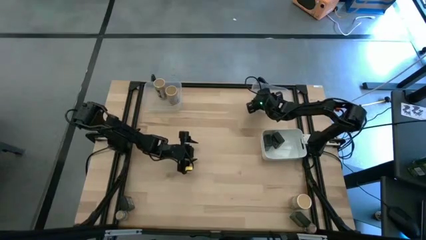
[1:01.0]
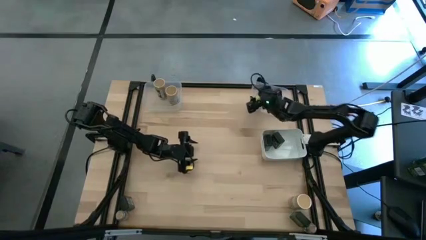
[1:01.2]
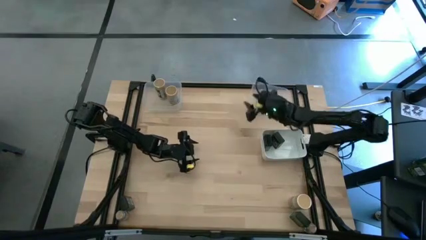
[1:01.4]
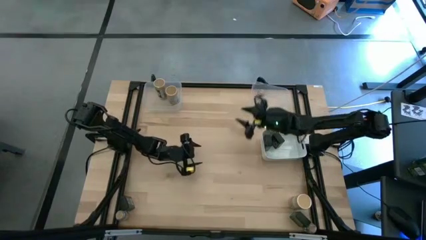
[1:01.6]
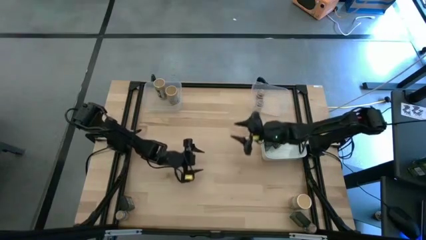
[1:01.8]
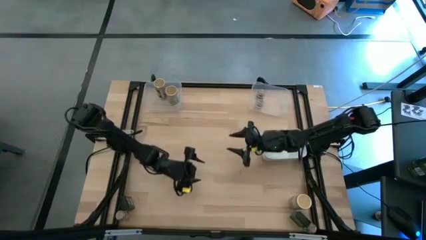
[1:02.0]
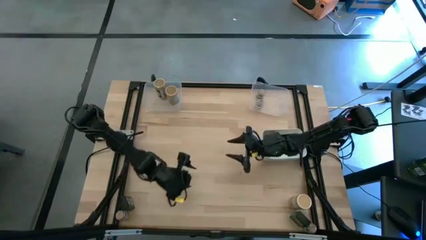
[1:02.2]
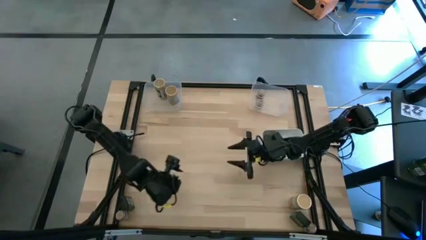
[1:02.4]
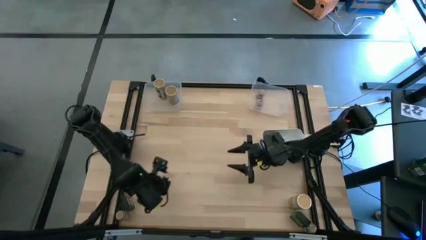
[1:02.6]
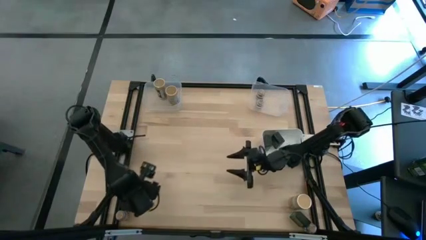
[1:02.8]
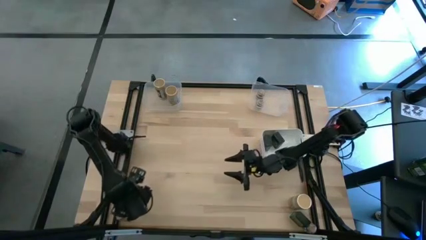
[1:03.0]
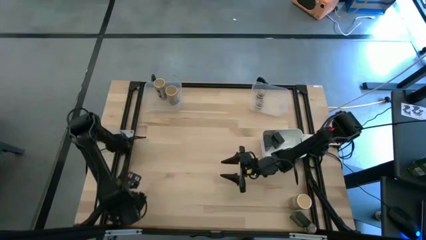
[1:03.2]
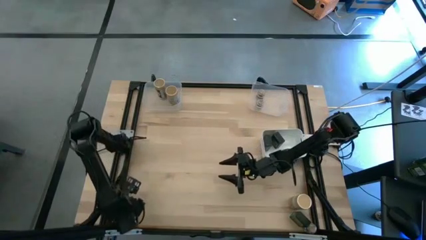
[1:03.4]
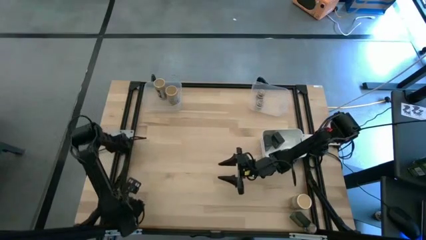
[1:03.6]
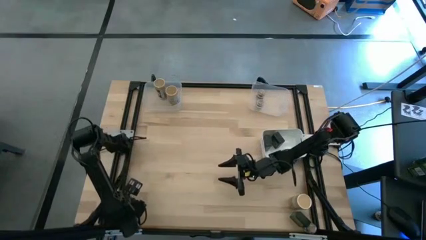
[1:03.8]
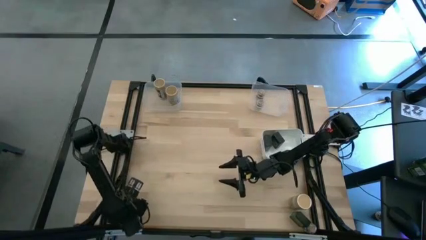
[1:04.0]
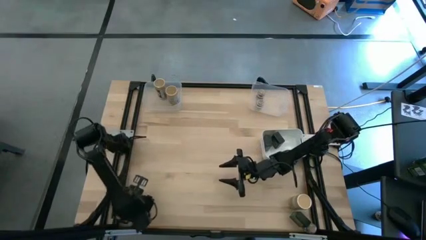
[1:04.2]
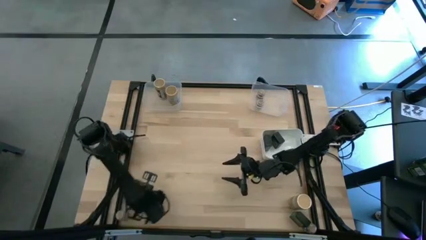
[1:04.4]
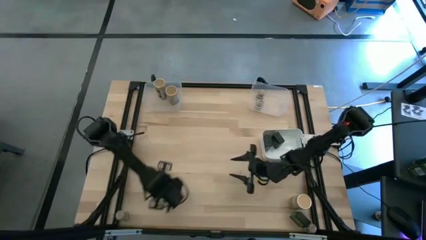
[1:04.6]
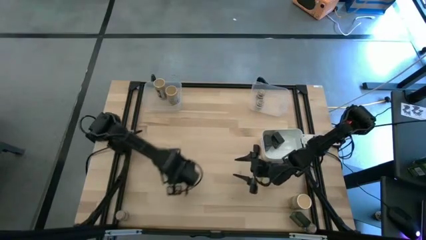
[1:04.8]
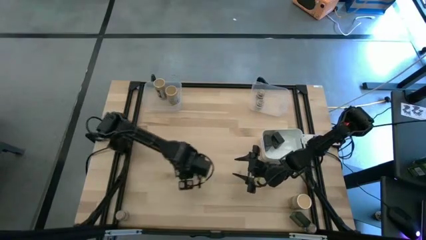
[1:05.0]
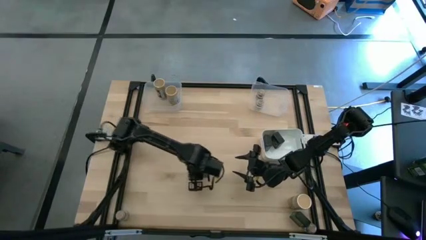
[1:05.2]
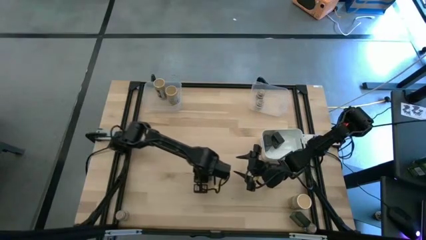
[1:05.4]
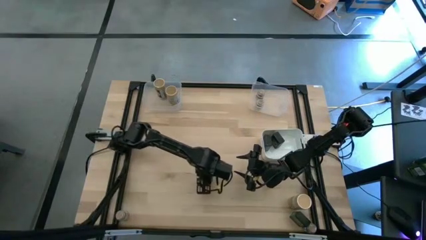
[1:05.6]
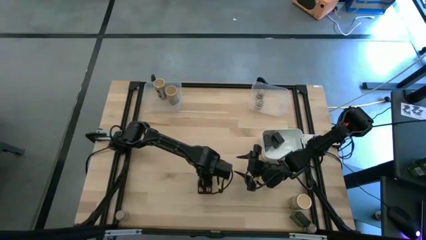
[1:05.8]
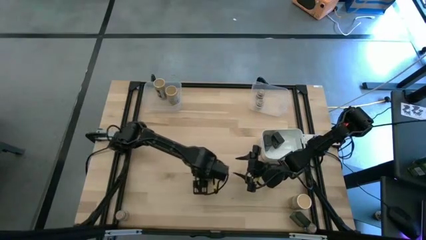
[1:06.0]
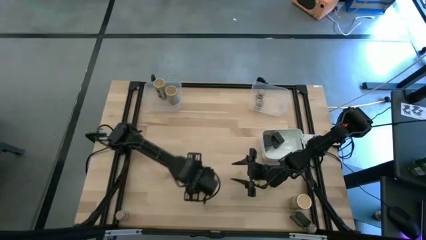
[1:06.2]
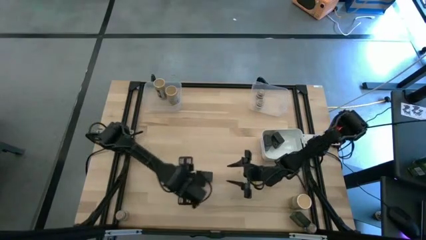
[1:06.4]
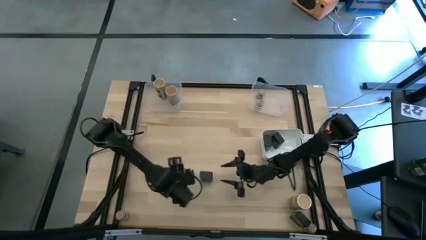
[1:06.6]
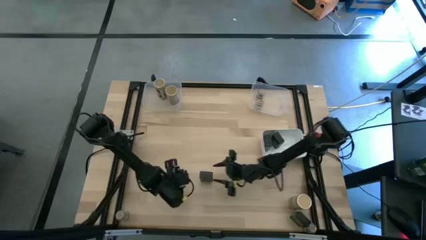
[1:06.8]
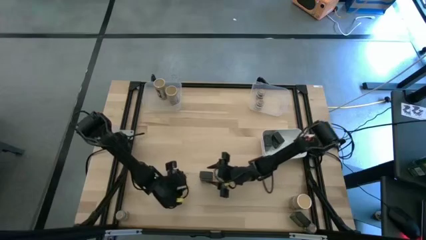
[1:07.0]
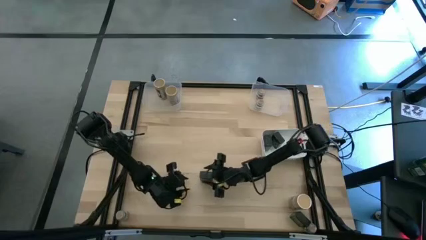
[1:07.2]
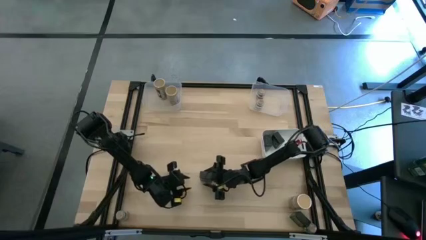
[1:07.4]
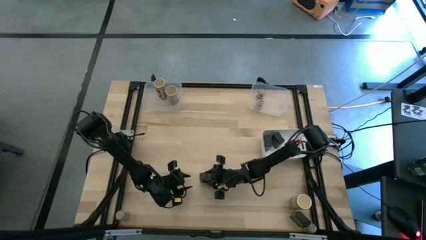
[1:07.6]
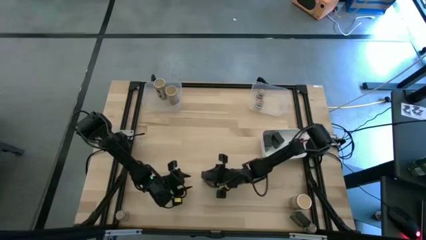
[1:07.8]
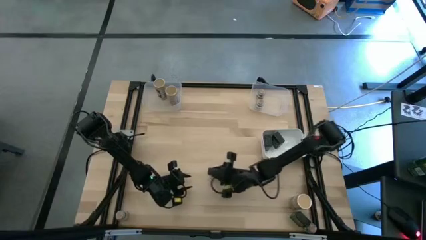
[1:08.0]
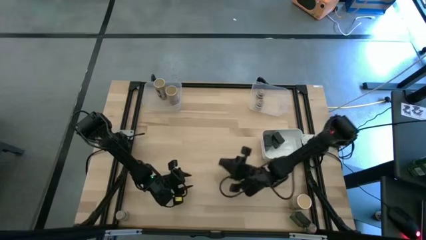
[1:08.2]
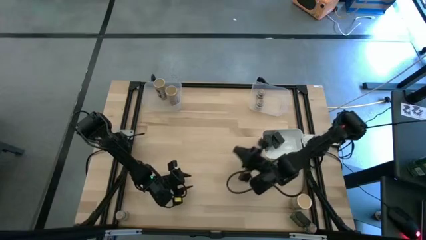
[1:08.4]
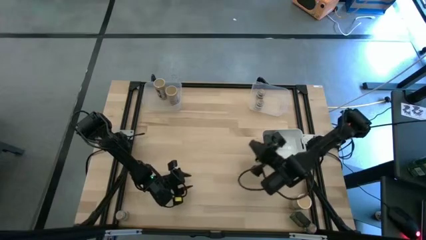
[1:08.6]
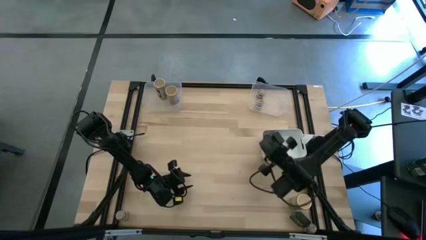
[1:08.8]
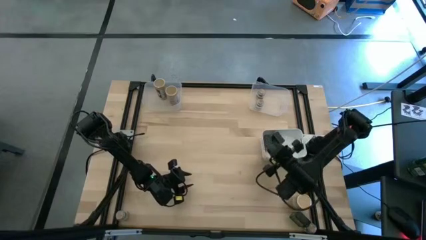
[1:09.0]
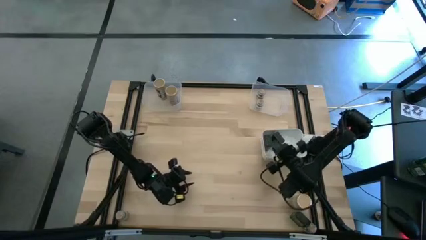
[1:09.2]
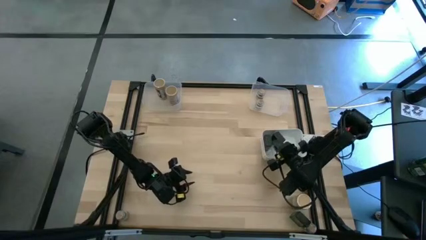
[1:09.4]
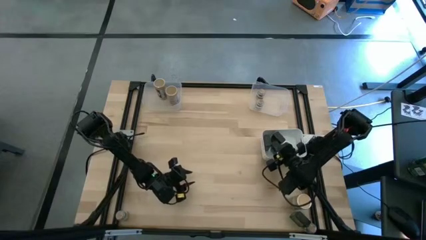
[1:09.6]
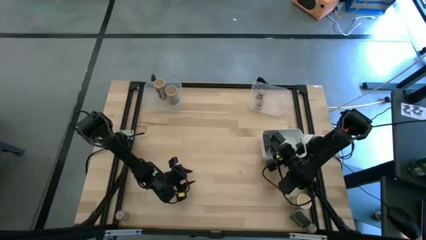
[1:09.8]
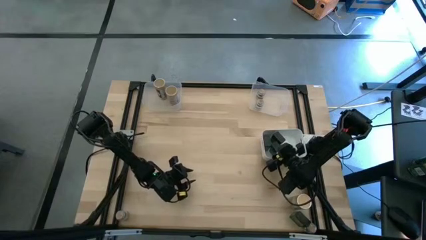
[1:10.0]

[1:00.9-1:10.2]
Task: Sort spices by type
Put the left black seasoning can into the white bin

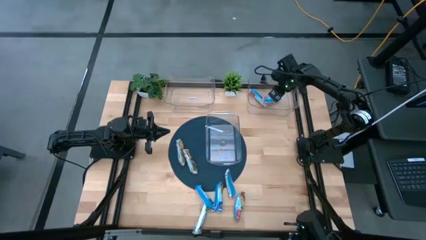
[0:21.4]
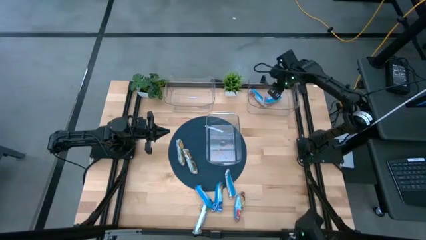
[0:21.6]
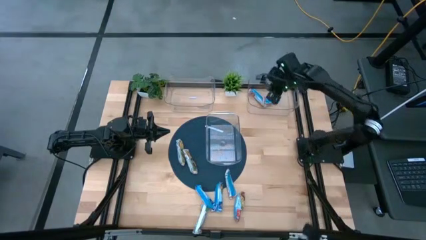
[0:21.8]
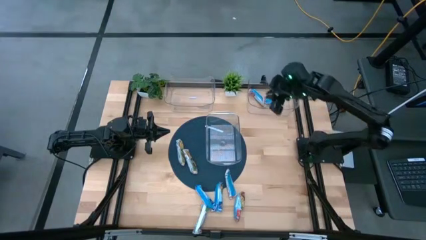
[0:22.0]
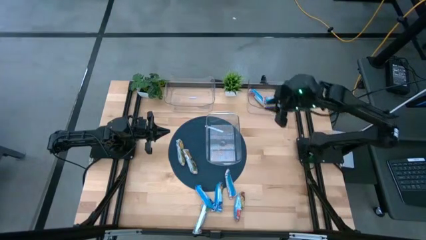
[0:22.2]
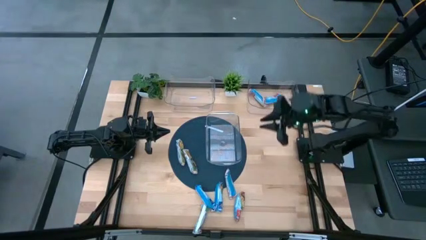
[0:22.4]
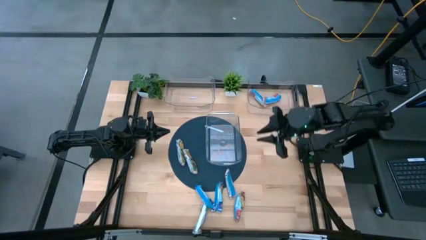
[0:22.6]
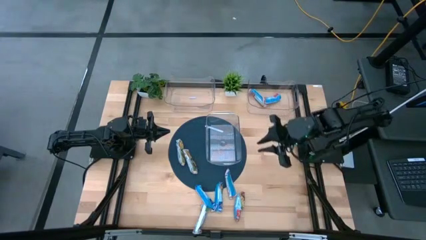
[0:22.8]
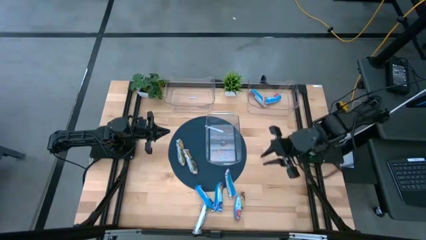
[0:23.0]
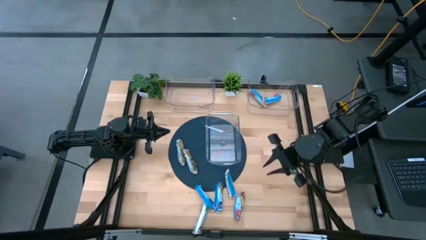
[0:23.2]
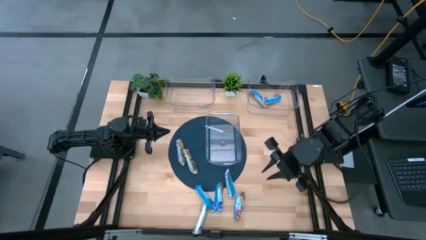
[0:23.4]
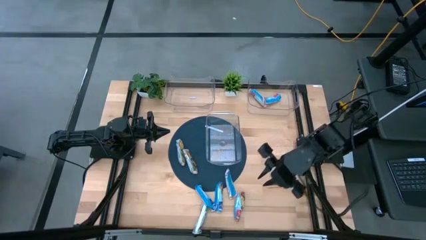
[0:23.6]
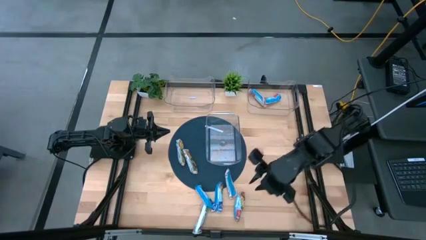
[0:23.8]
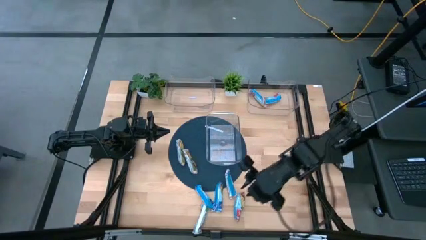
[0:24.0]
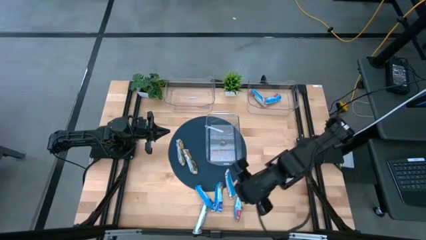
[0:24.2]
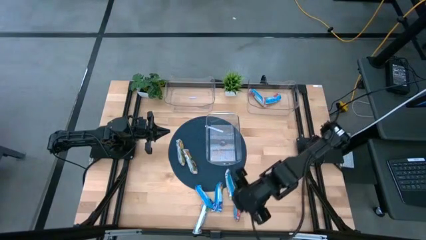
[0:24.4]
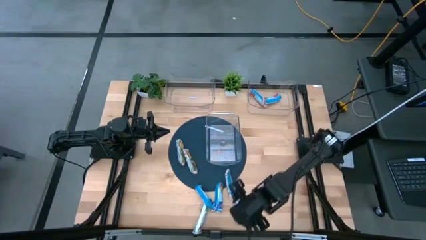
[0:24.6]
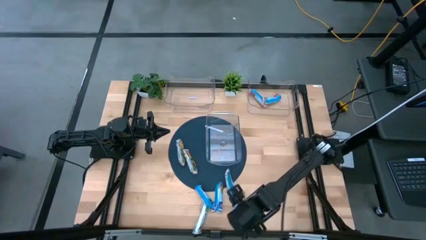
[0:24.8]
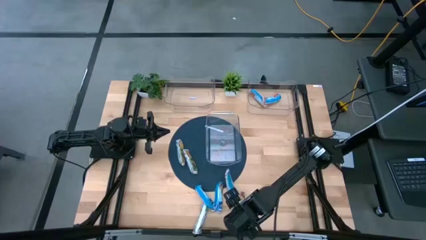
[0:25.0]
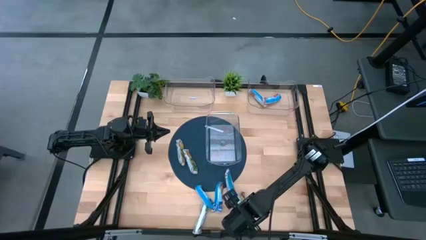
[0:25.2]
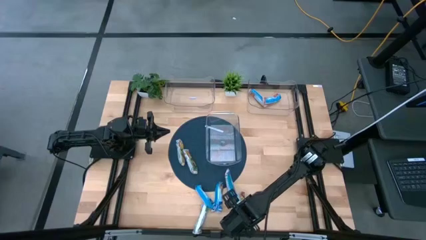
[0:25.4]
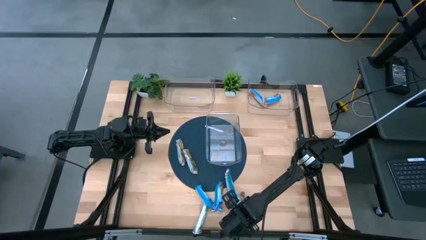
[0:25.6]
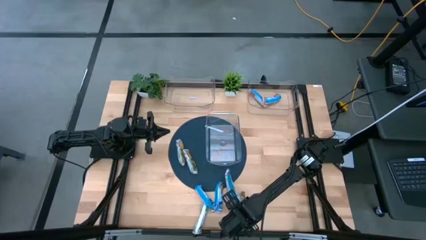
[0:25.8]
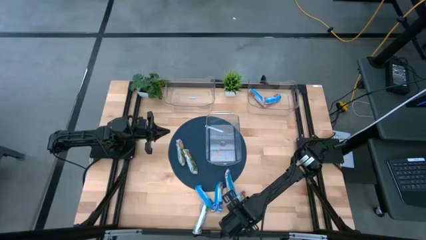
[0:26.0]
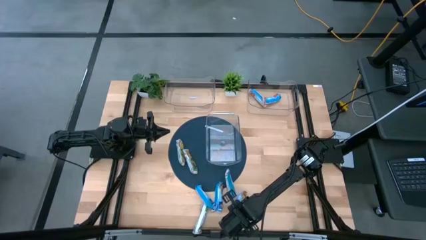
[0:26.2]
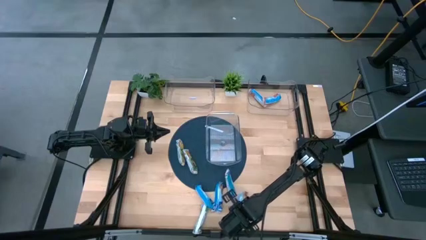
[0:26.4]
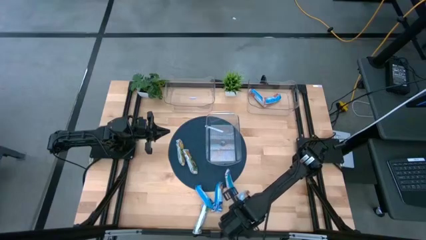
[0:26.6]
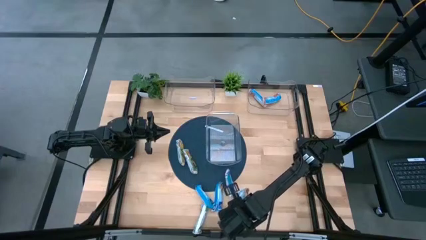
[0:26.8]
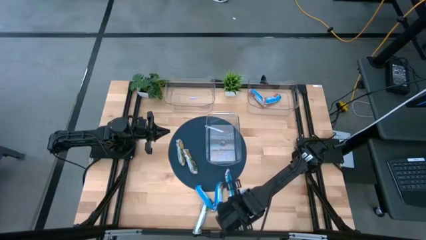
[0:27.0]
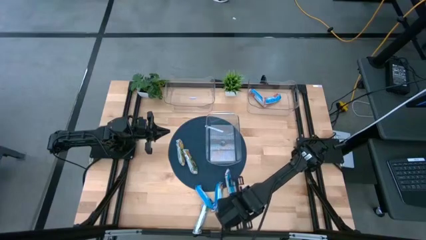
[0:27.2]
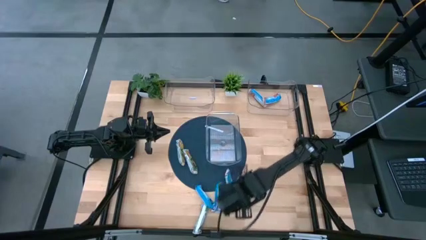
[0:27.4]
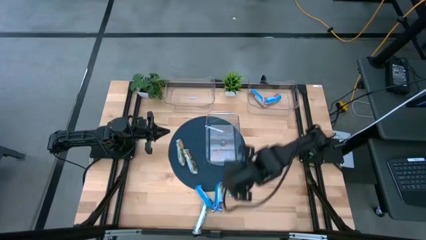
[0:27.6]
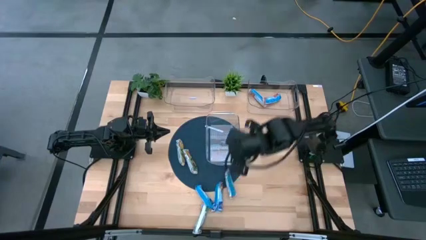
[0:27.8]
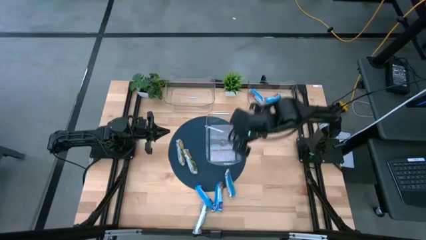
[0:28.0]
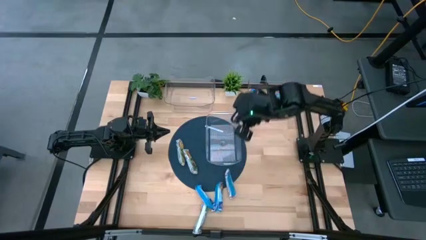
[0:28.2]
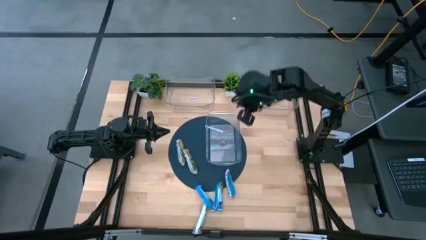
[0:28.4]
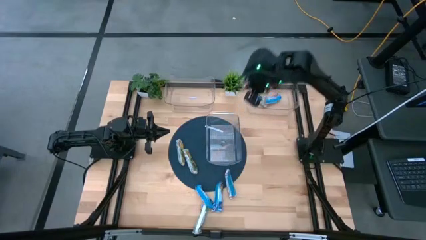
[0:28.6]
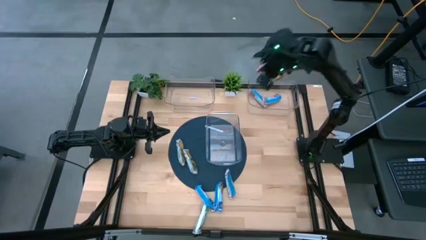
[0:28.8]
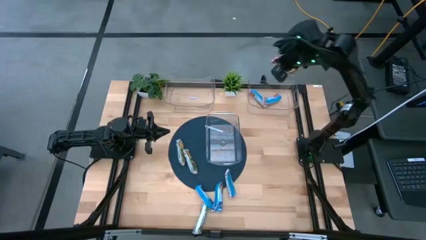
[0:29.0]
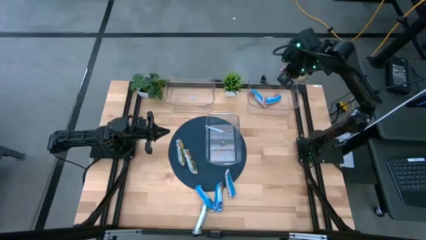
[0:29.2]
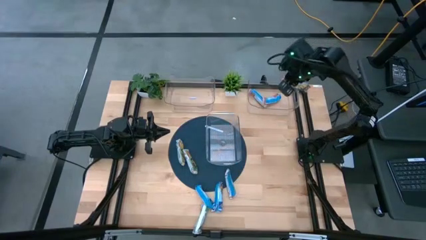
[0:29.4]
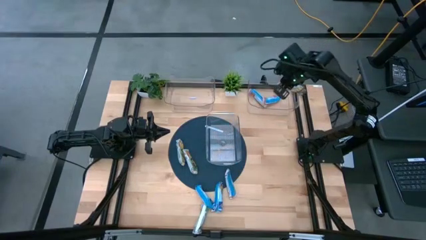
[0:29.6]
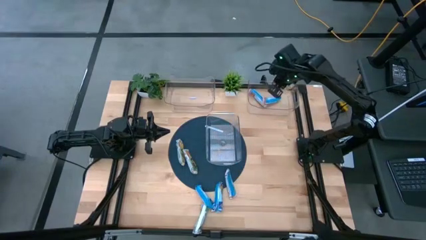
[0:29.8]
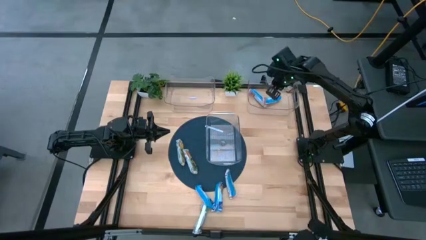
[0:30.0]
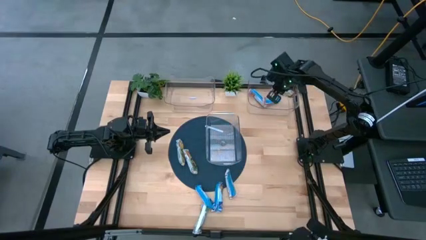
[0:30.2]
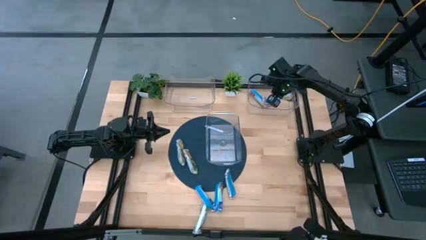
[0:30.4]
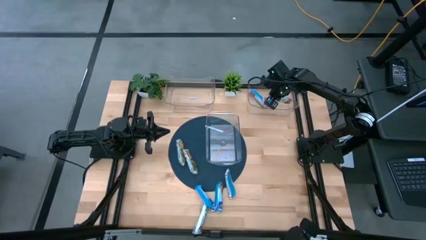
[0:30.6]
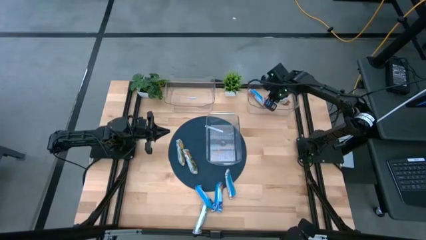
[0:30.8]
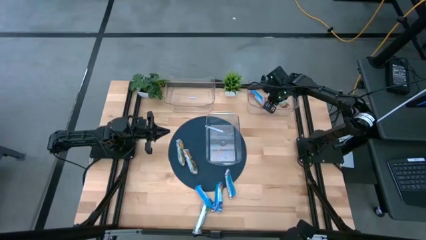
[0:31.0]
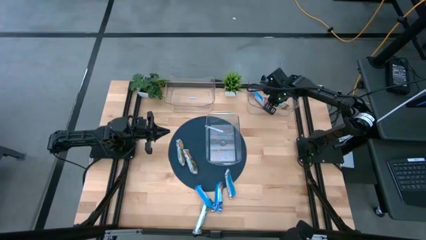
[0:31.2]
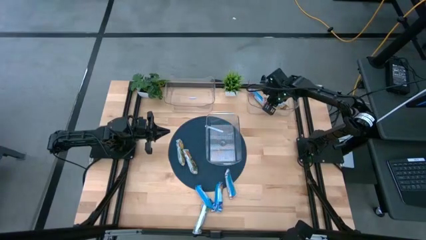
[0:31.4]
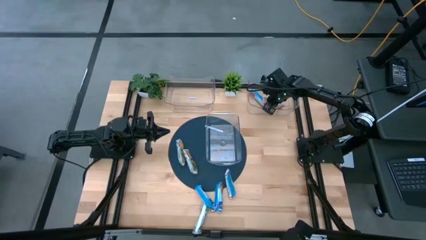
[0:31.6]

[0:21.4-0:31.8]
Task: Pick and place Granola Bars by type
Put the red granola bar into the top right transparent bin
